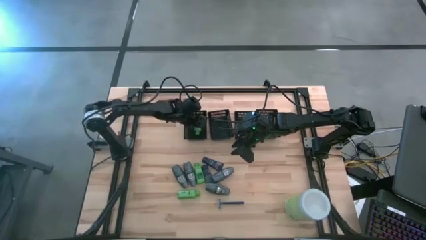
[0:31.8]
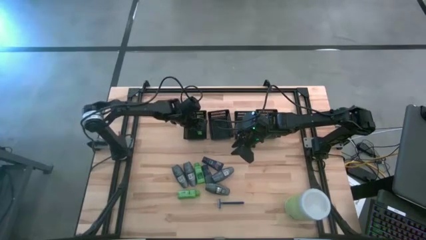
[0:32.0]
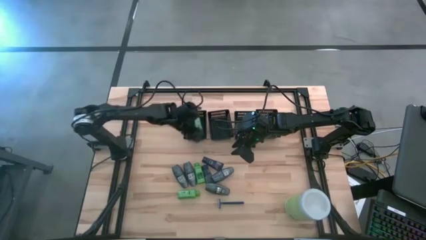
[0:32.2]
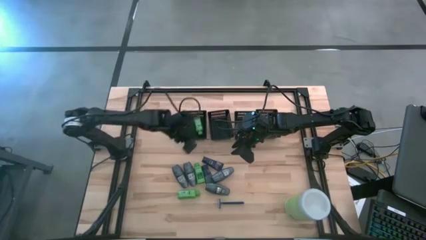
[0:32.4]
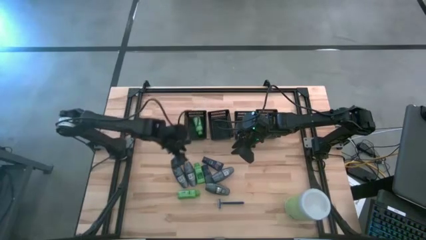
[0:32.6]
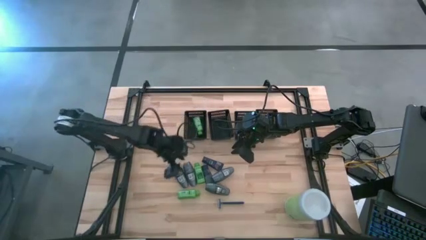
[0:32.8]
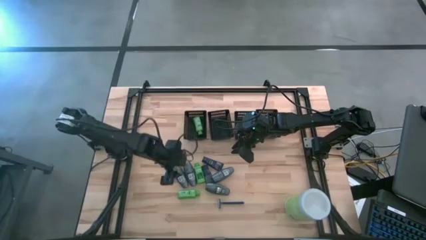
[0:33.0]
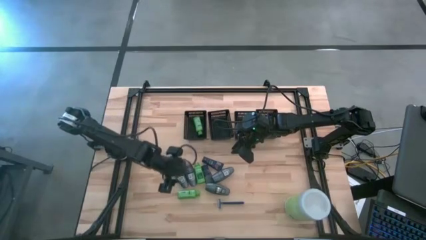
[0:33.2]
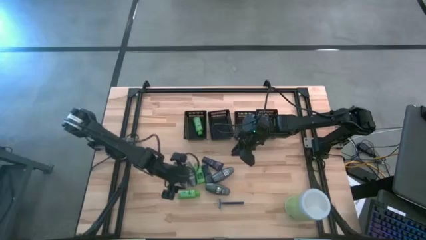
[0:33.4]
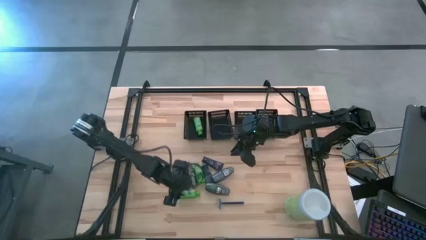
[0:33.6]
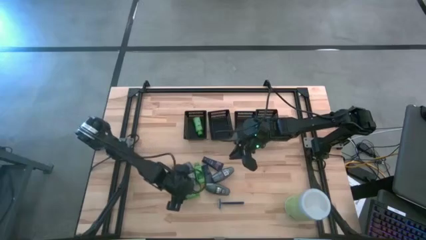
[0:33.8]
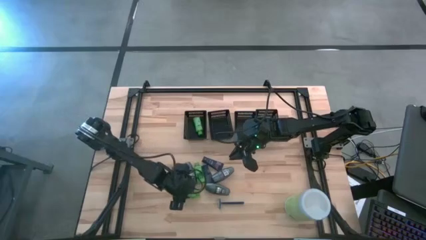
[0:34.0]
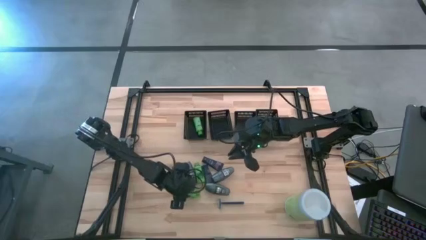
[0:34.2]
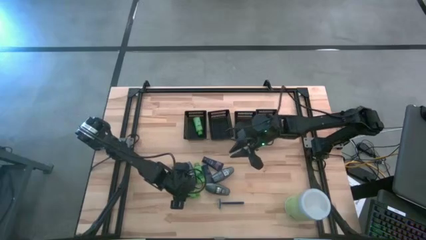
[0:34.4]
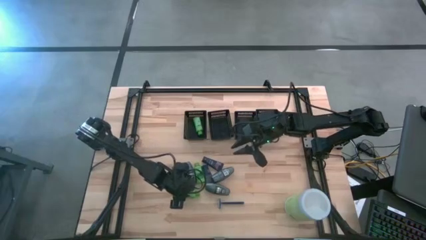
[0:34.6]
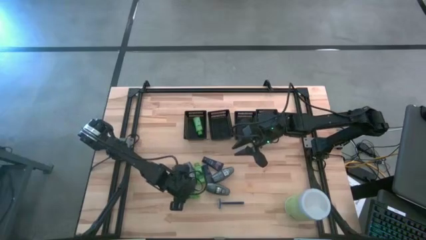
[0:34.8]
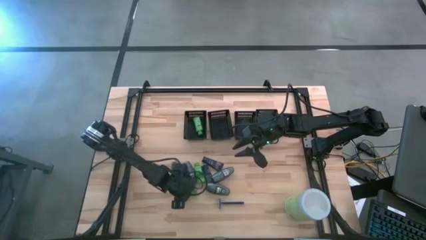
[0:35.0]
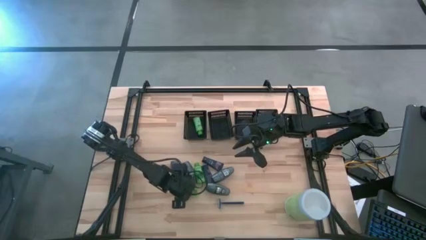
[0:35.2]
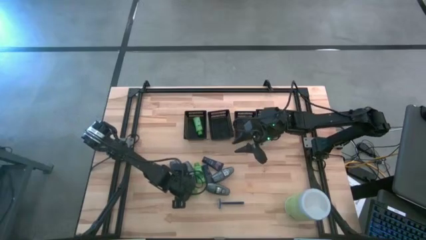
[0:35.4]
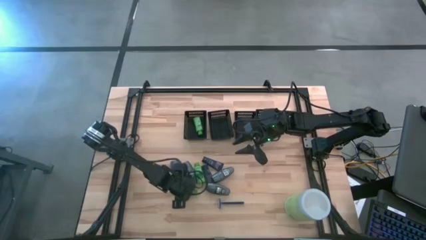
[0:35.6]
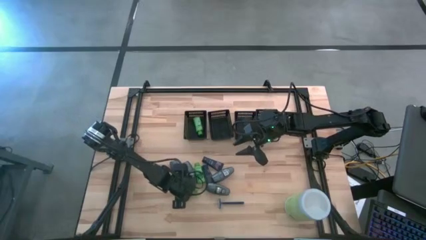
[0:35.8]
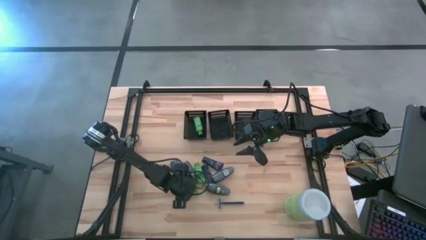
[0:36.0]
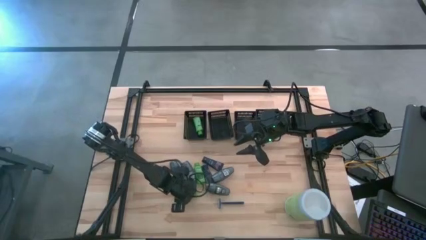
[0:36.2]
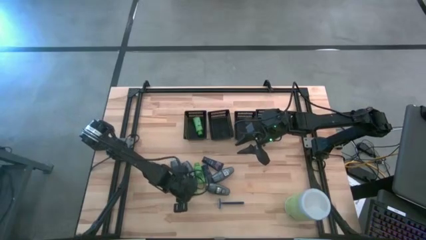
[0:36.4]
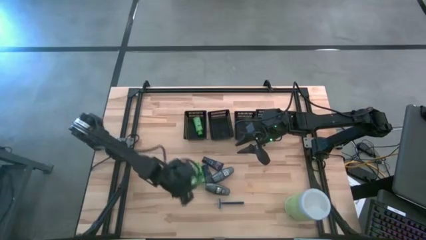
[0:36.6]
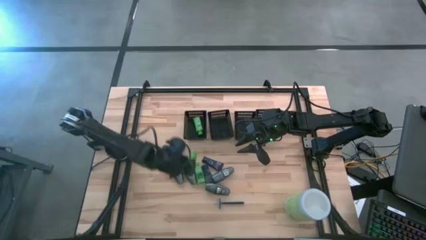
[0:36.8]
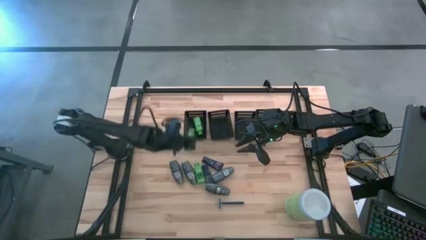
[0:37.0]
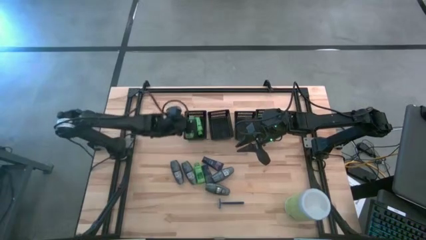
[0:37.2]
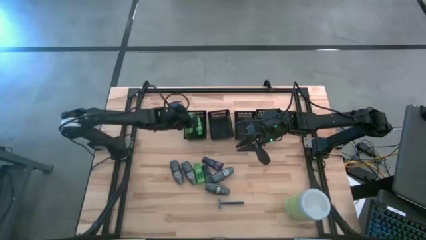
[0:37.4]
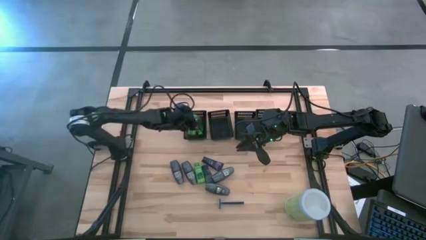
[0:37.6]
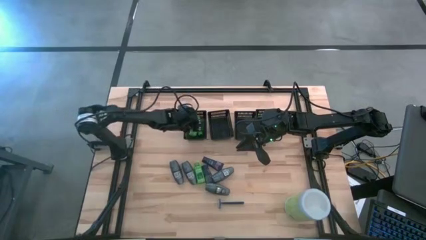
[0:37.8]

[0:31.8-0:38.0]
Task: Pick & Place Travel size toiletries
Put the shampoo into the left black basket

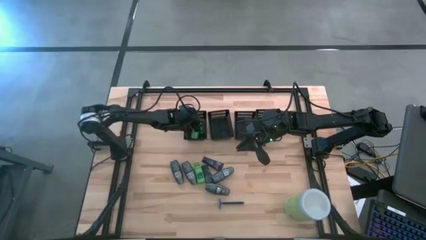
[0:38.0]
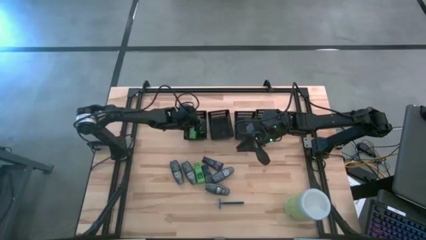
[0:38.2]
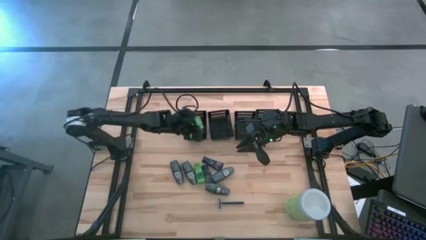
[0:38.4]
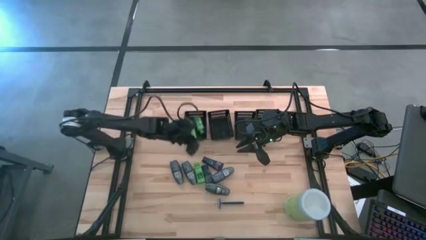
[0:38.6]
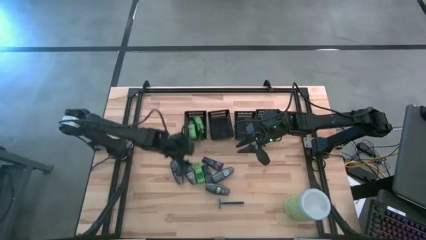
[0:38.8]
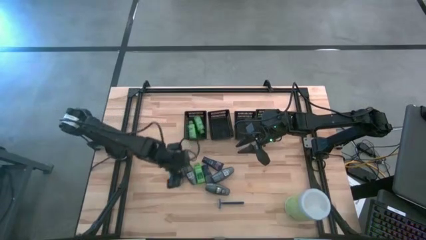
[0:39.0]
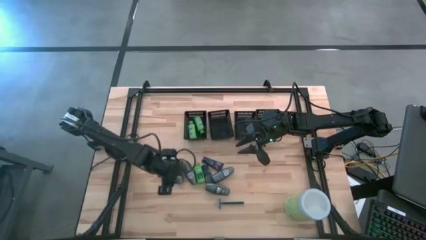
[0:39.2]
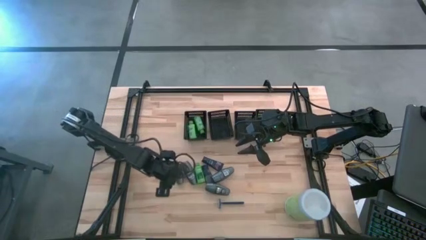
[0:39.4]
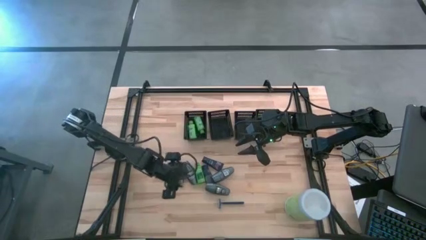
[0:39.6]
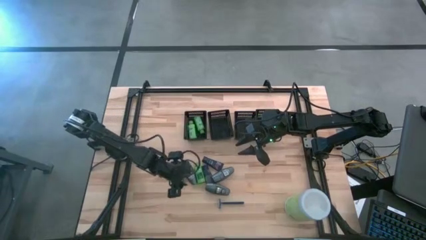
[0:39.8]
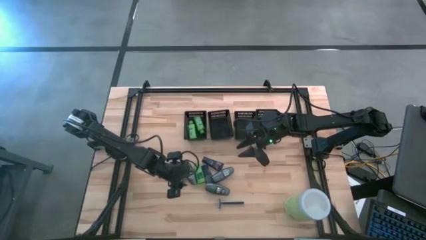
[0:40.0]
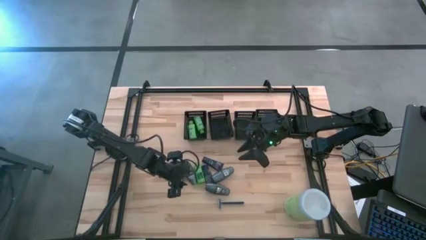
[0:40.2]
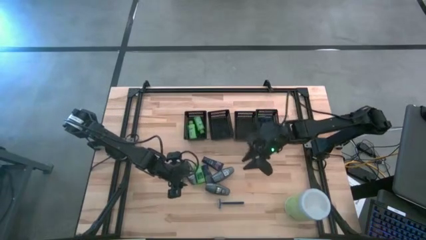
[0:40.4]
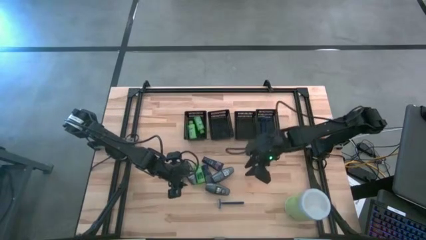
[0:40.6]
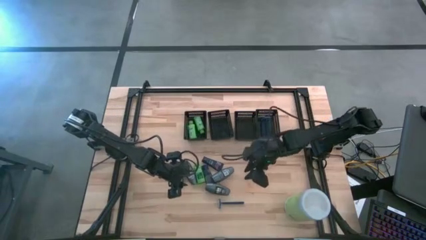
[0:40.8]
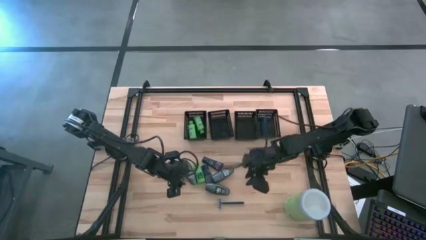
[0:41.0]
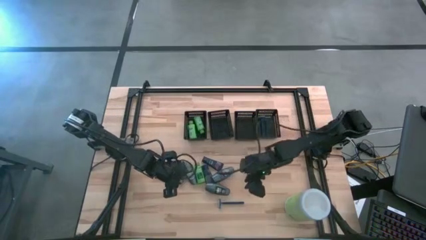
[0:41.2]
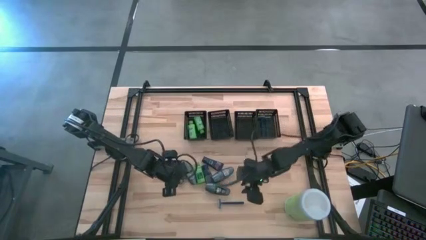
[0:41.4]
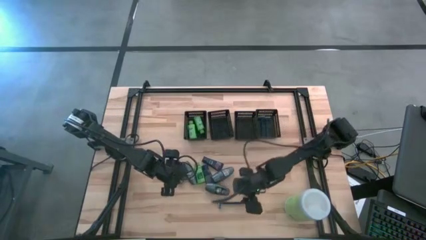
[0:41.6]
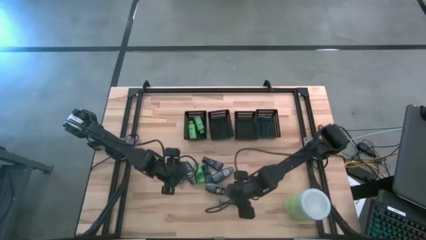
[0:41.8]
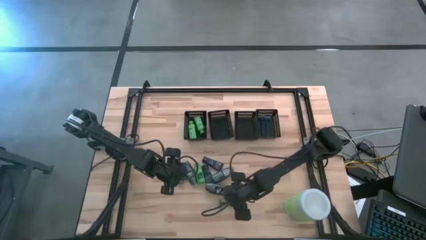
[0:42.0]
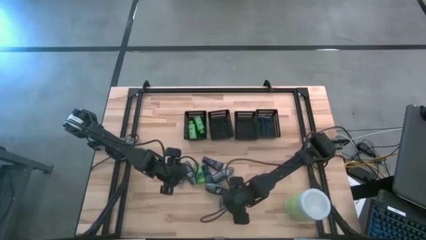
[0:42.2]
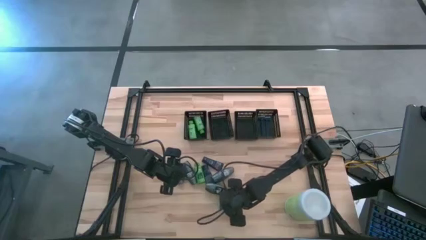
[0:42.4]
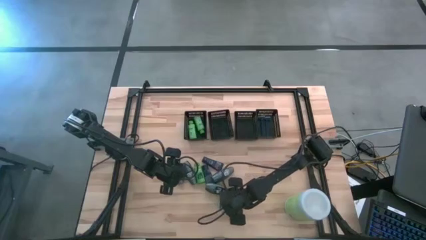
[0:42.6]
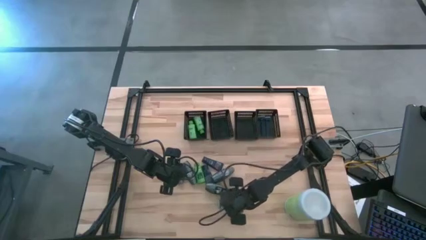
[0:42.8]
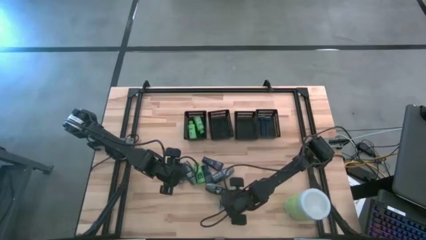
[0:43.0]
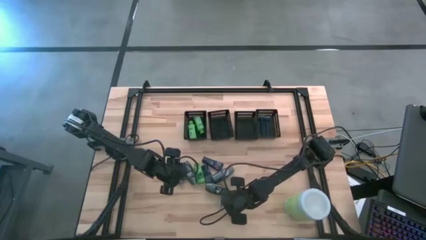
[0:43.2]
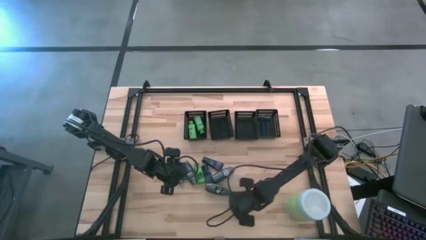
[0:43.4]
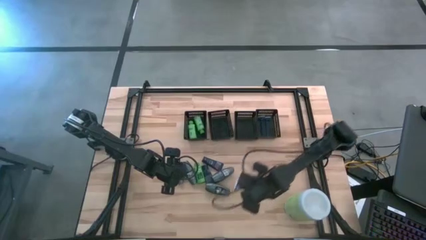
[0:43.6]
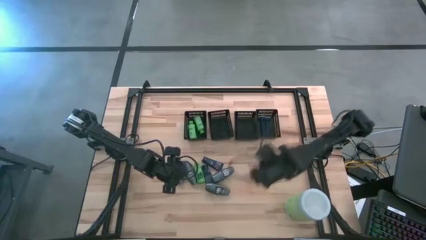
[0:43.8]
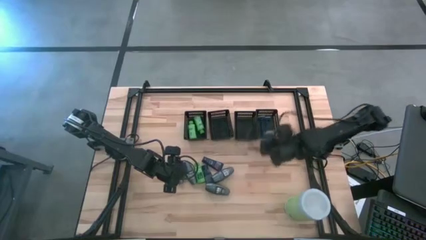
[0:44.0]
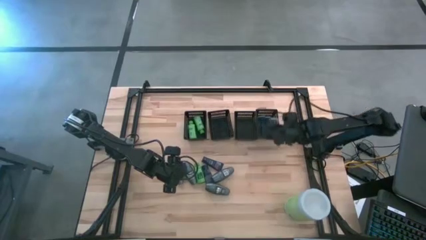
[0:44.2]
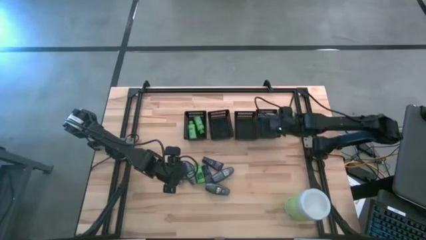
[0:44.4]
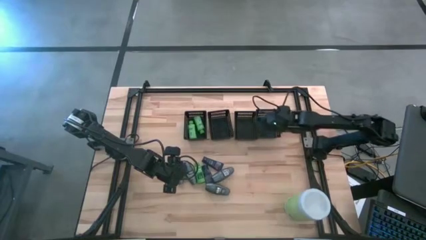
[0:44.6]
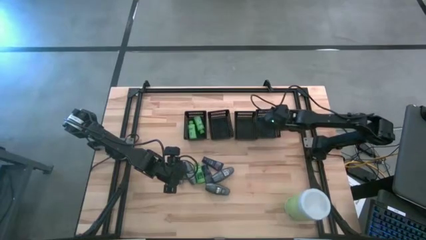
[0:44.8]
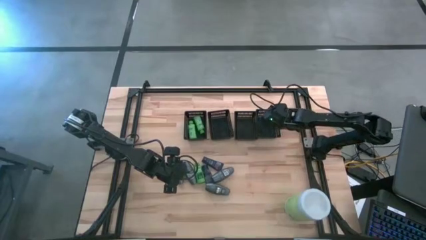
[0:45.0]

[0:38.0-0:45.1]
Put the razor into the right black basket

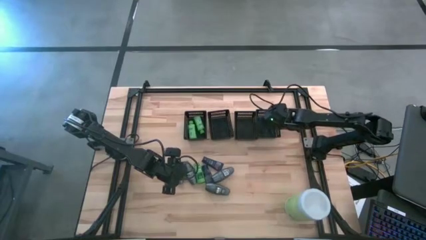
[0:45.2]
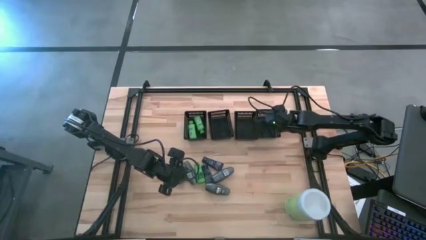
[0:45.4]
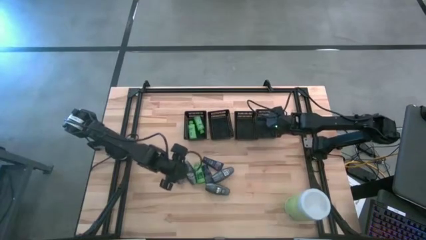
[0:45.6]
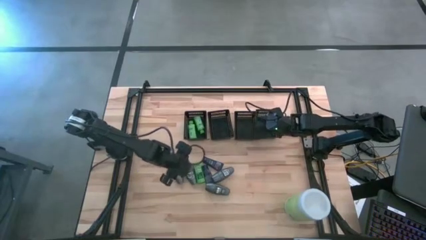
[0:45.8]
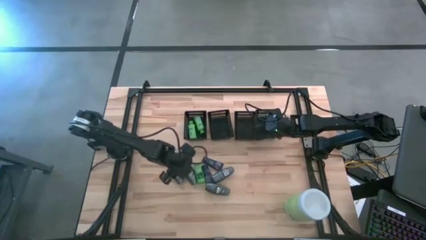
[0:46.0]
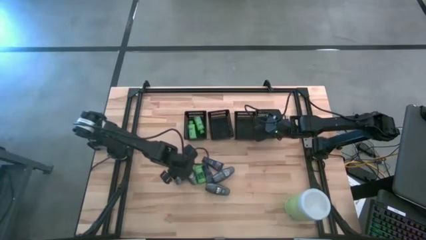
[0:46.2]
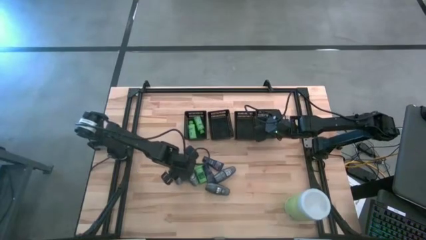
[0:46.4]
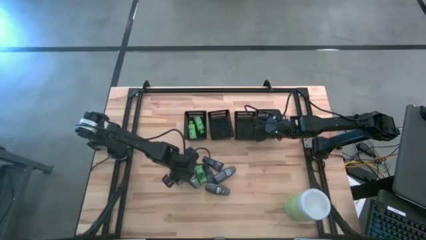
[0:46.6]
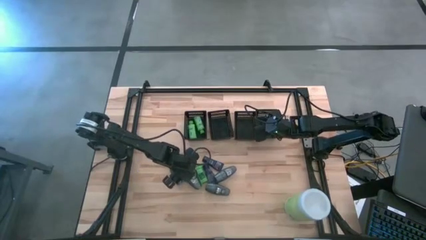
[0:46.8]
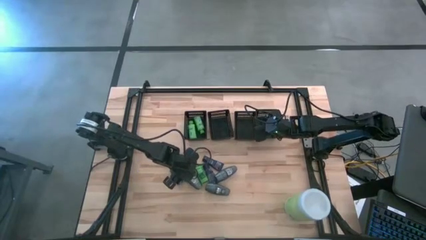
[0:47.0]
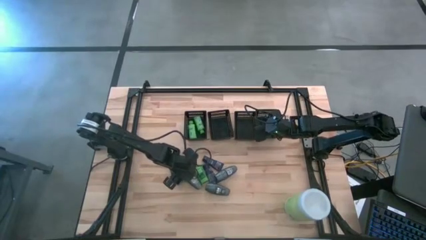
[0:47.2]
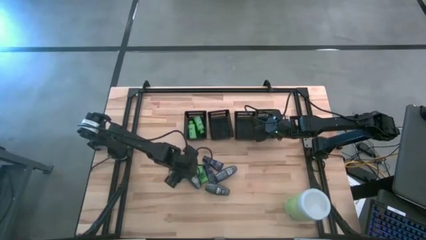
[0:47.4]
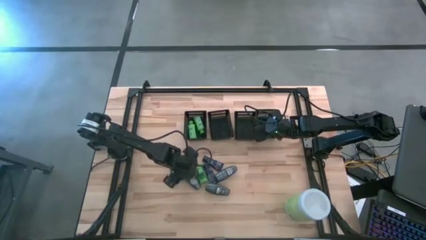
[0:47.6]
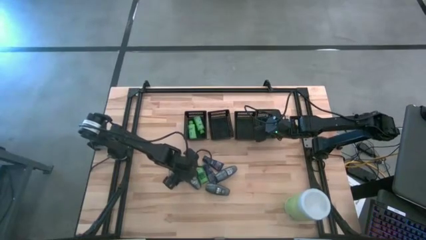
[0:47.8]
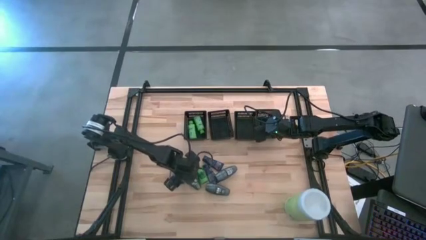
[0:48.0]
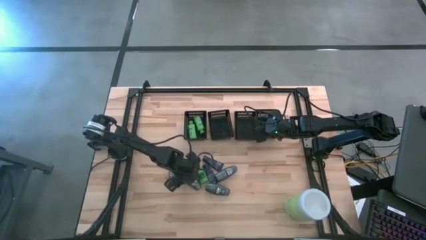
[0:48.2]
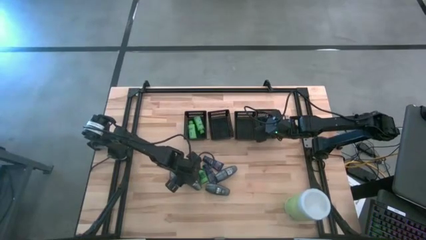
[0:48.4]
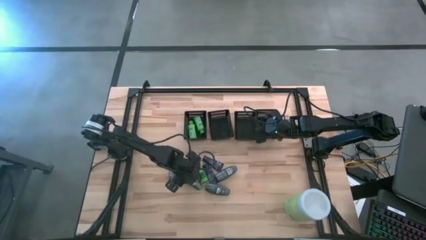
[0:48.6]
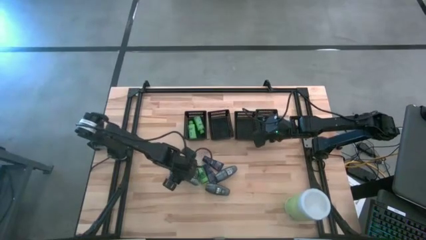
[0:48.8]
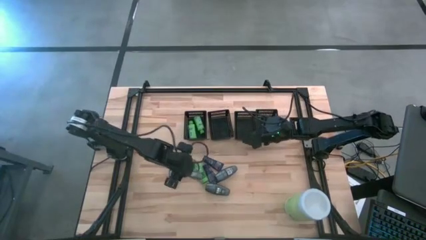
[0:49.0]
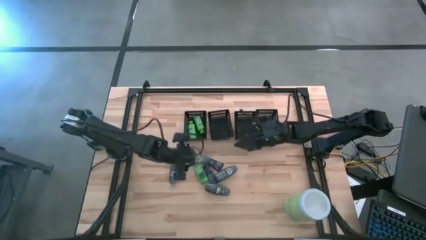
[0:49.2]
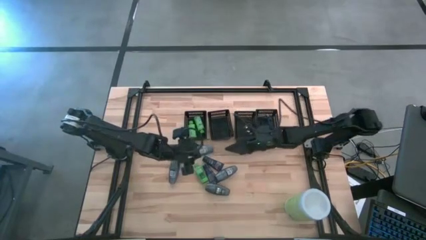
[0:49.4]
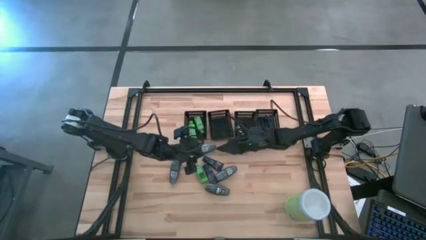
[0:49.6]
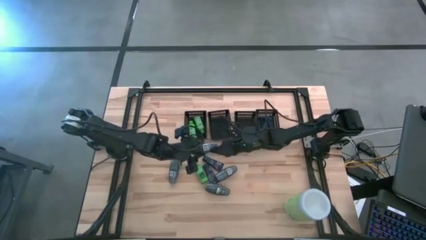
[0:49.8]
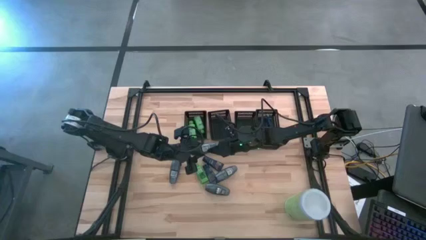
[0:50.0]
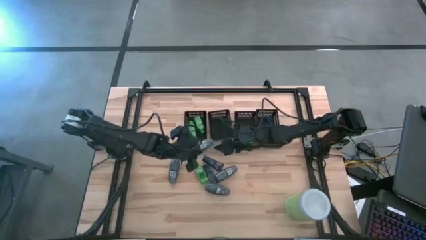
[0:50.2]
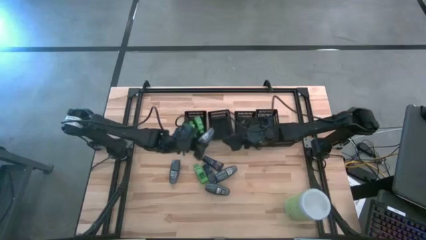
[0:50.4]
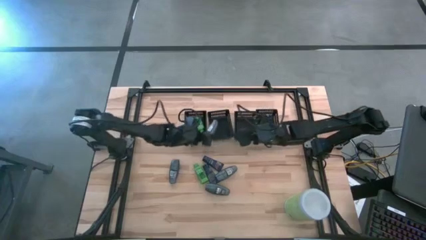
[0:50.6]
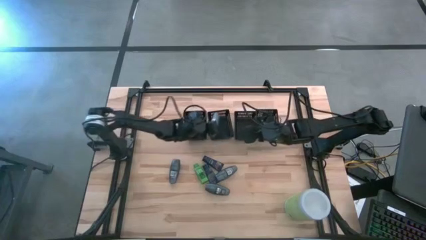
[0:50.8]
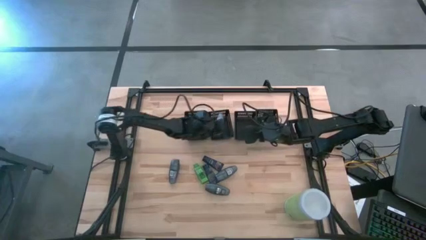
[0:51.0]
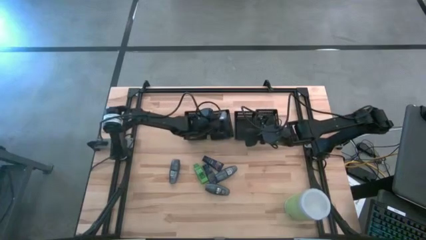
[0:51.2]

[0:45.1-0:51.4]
Put the roll-on into the center left black basket
